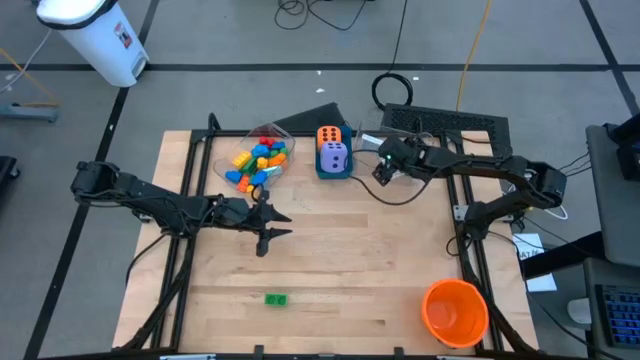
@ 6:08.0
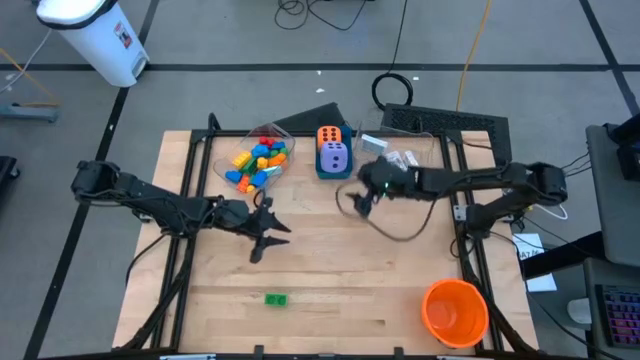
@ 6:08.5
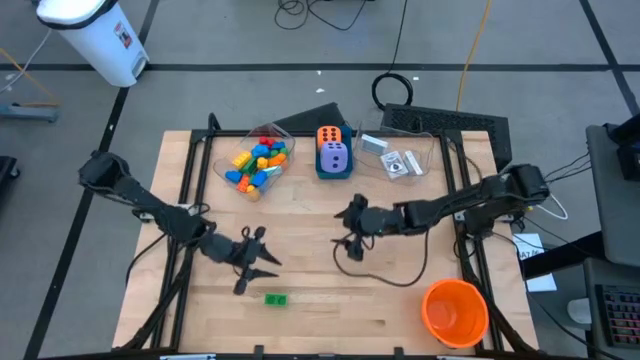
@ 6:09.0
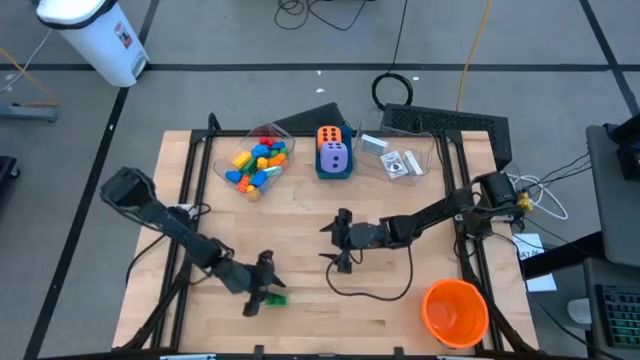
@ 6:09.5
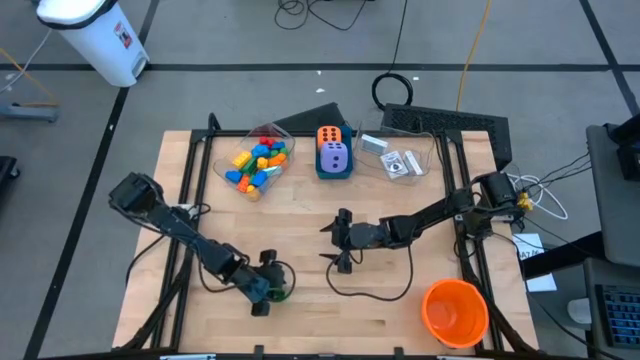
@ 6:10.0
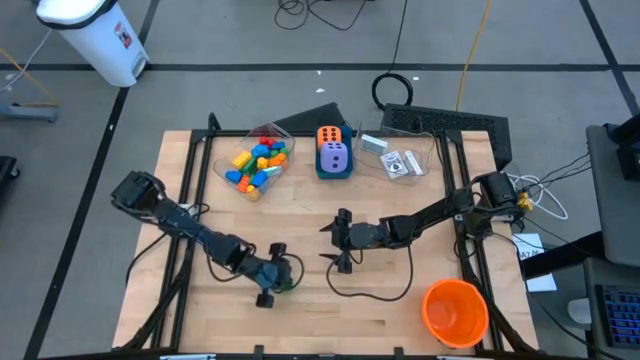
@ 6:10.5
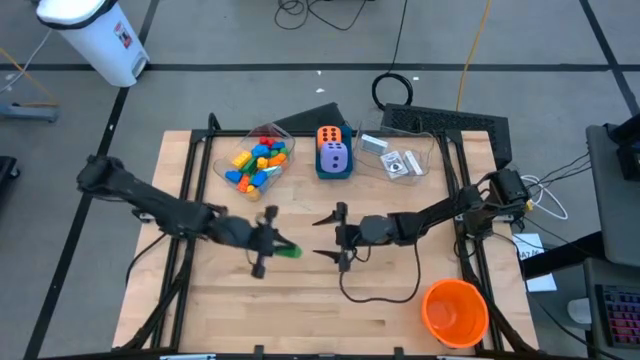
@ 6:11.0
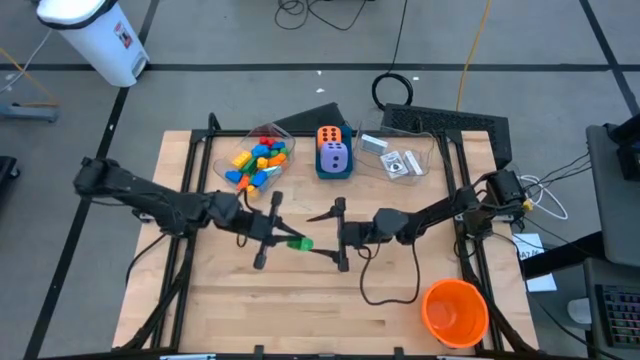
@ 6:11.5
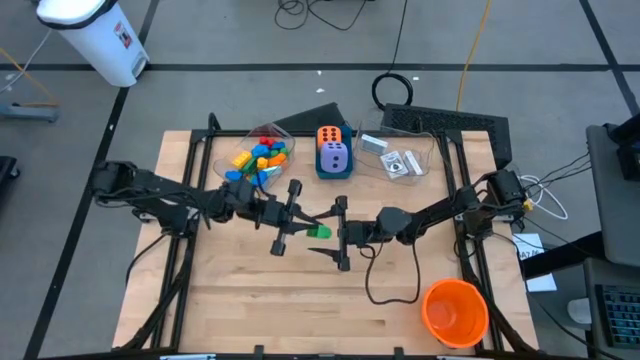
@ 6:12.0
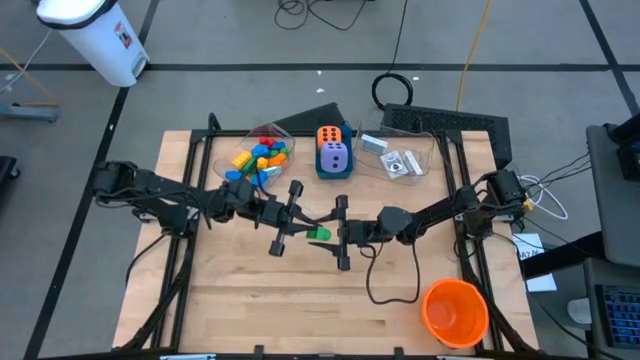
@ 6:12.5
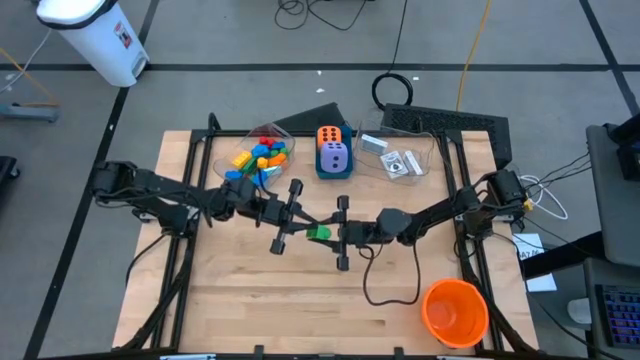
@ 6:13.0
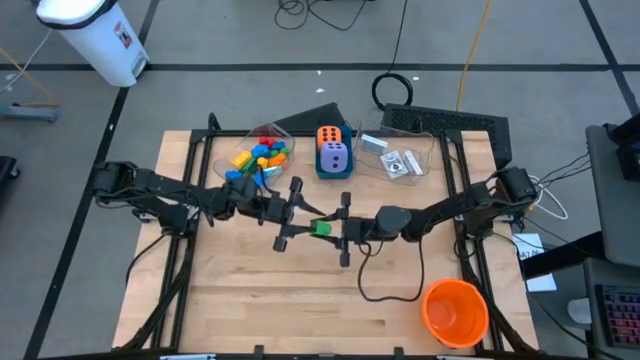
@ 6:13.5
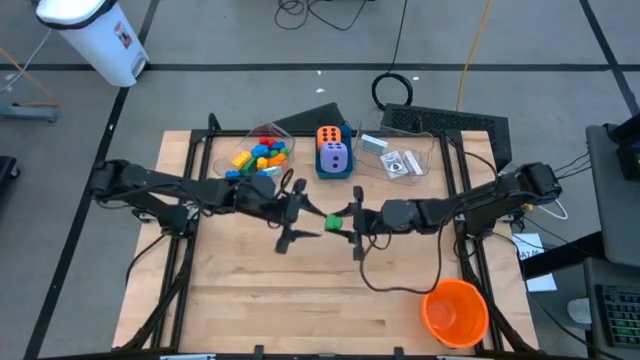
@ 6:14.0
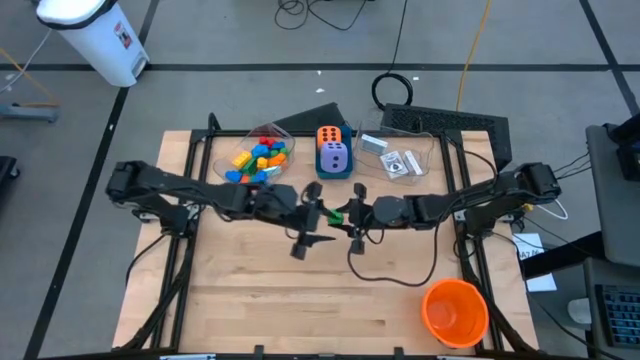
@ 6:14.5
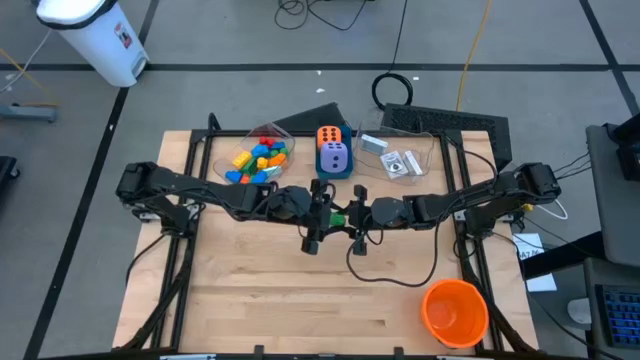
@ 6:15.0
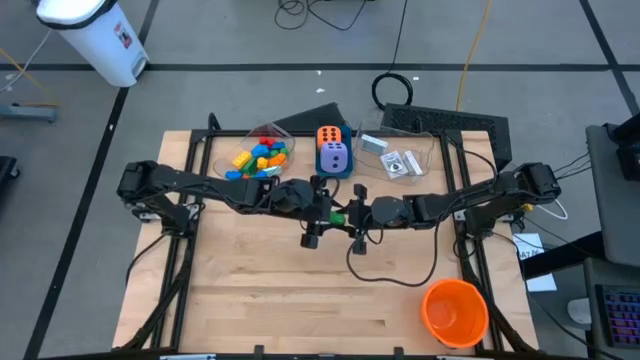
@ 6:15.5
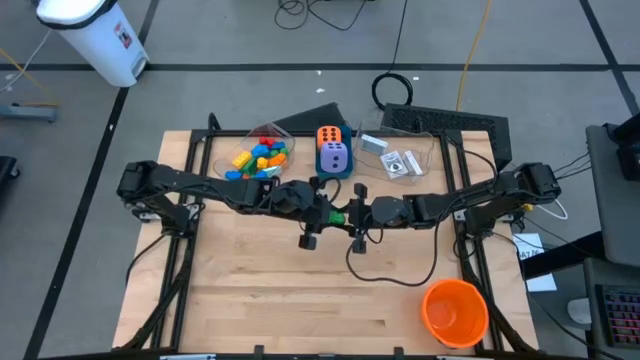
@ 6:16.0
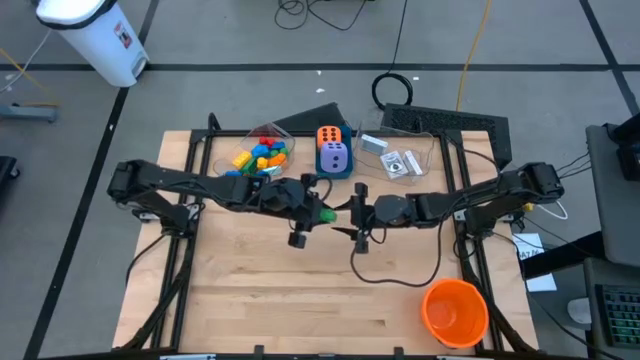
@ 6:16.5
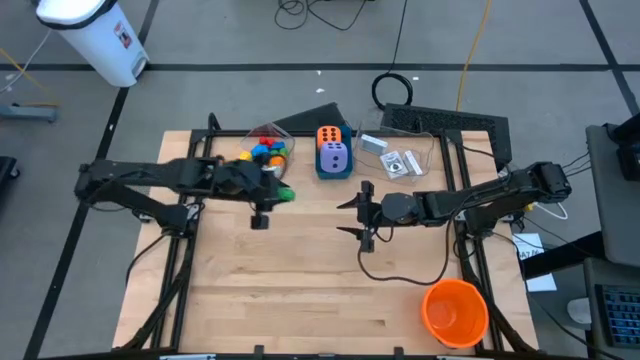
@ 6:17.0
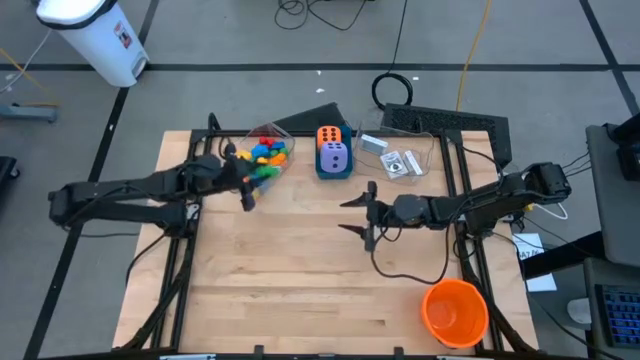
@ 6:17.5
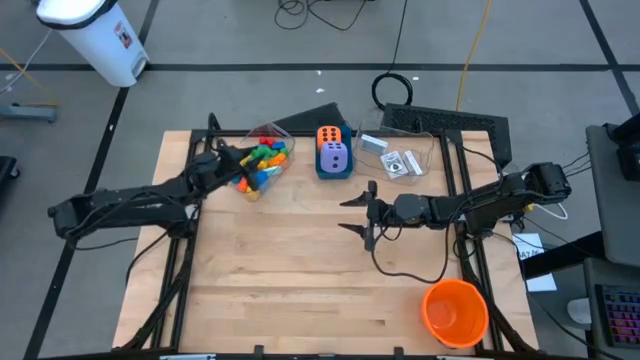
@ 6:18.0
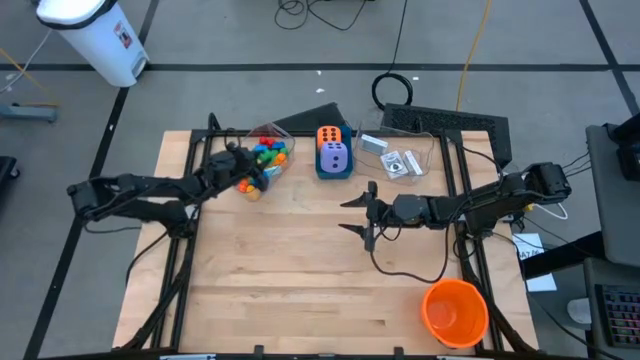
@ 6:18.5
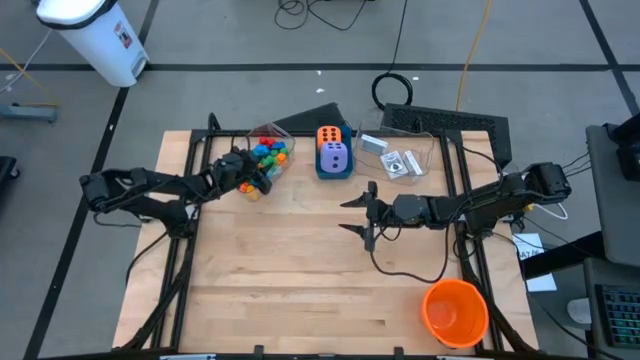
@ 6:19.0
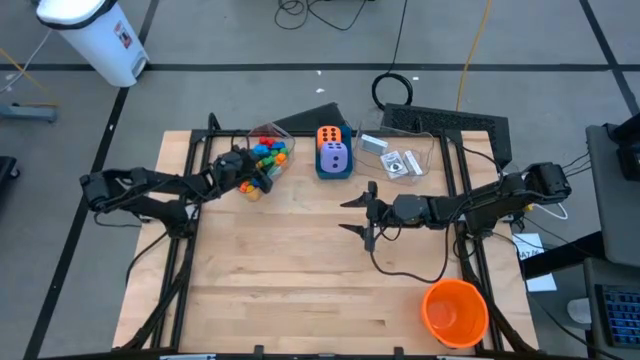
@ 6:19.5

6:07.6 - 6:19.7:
Task: Pick & Place Toys
Put the green game piece into the left transparent bin

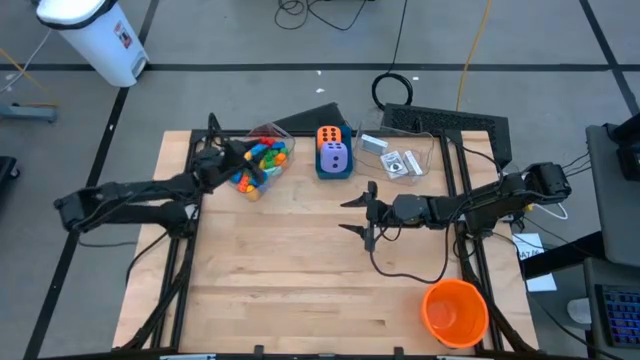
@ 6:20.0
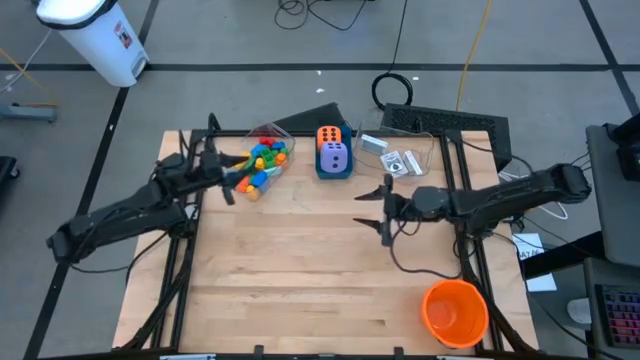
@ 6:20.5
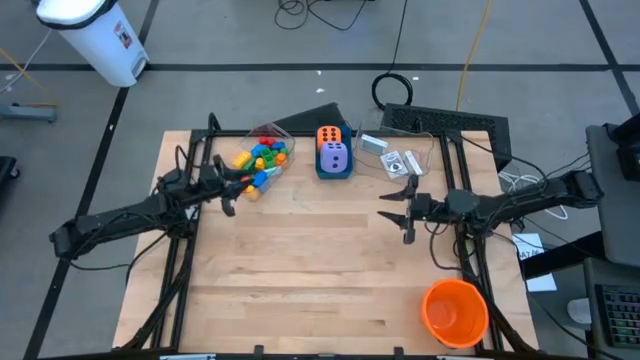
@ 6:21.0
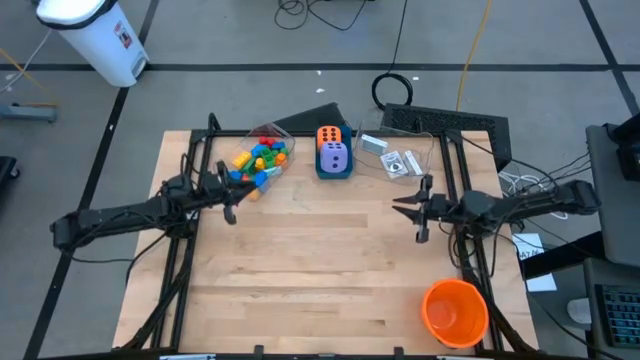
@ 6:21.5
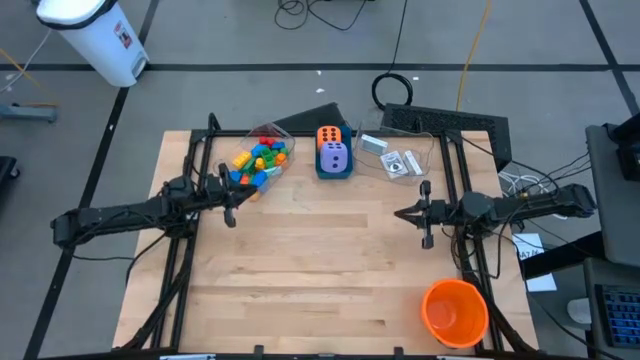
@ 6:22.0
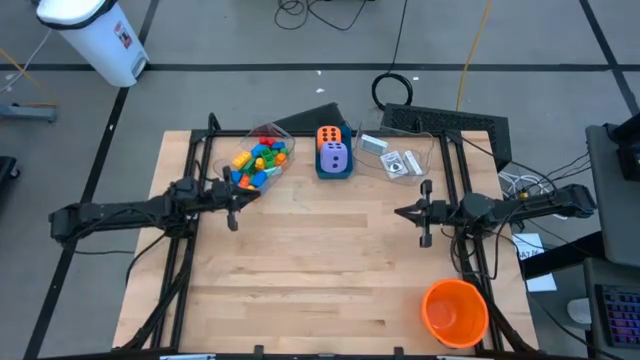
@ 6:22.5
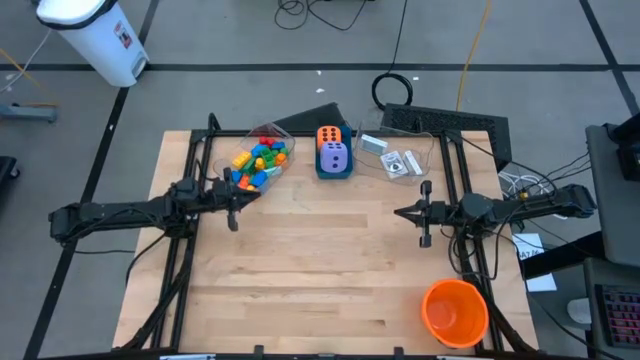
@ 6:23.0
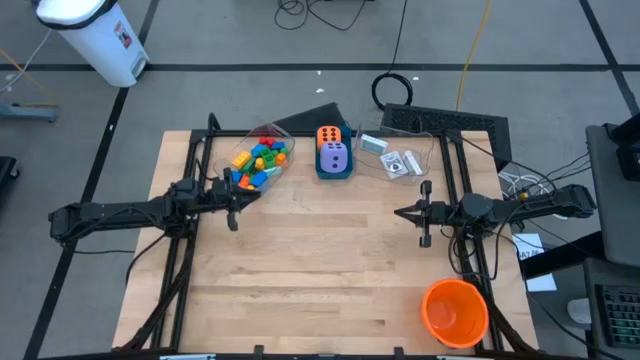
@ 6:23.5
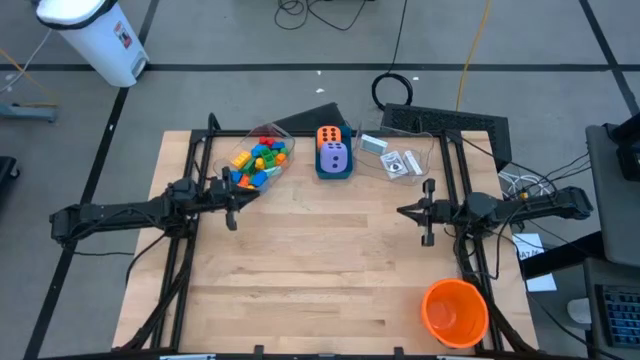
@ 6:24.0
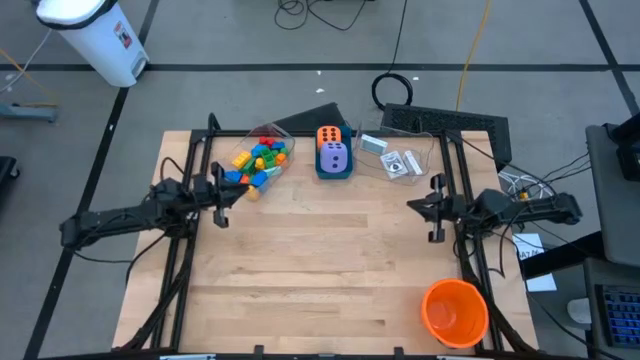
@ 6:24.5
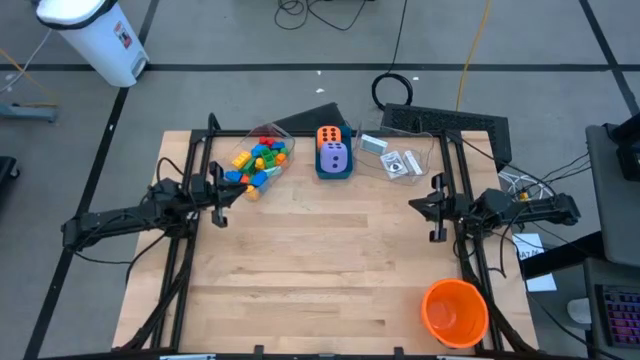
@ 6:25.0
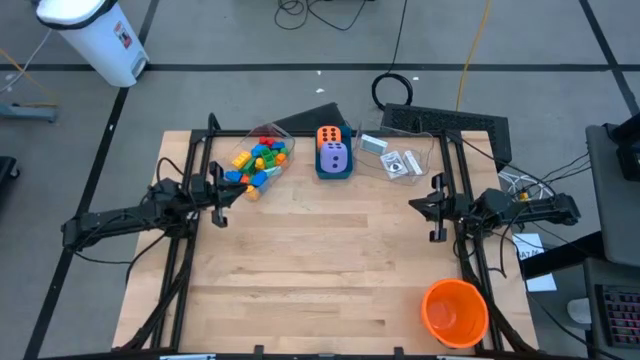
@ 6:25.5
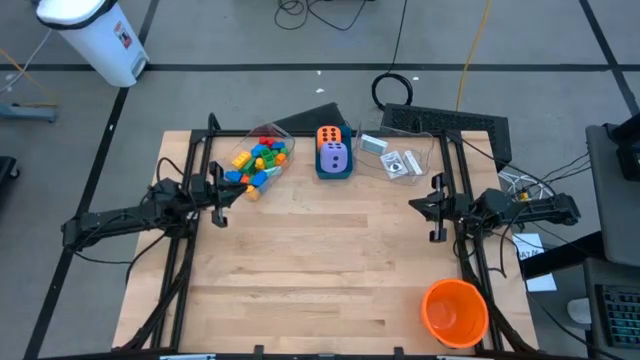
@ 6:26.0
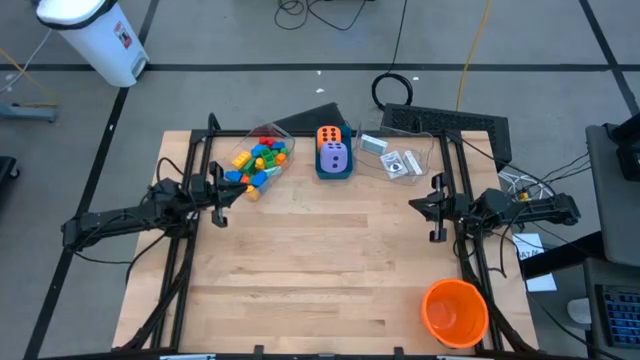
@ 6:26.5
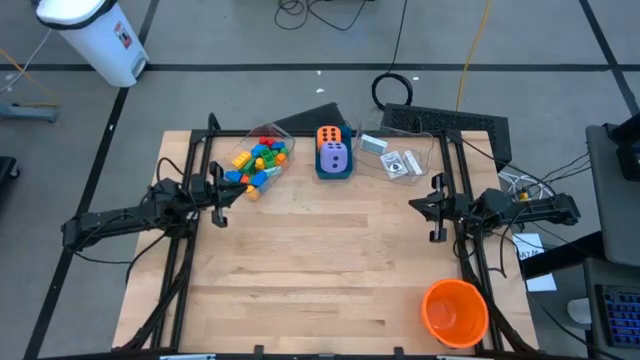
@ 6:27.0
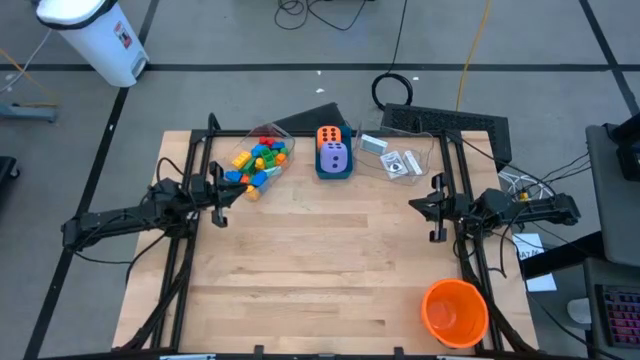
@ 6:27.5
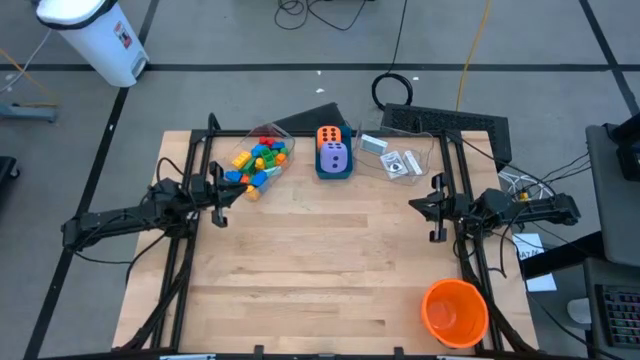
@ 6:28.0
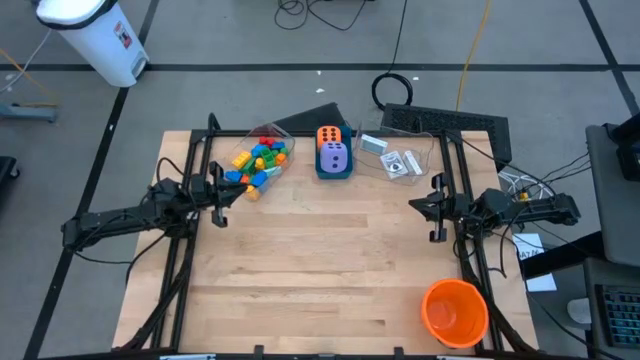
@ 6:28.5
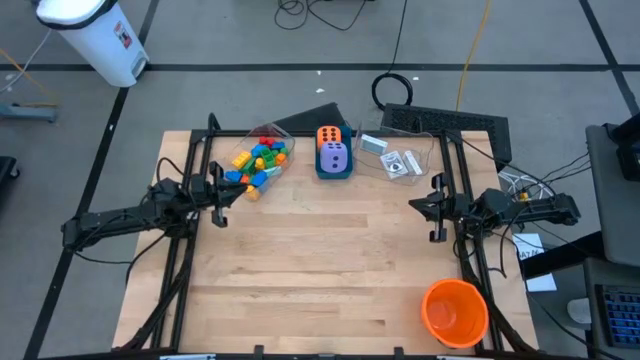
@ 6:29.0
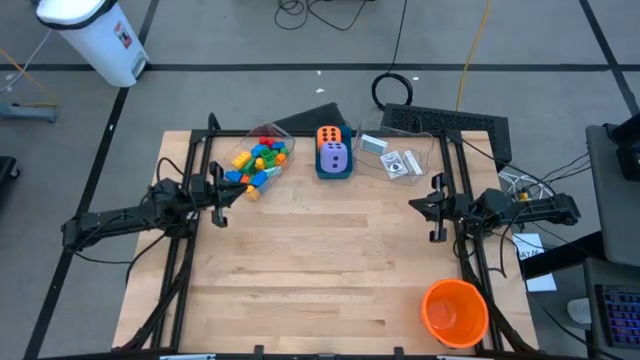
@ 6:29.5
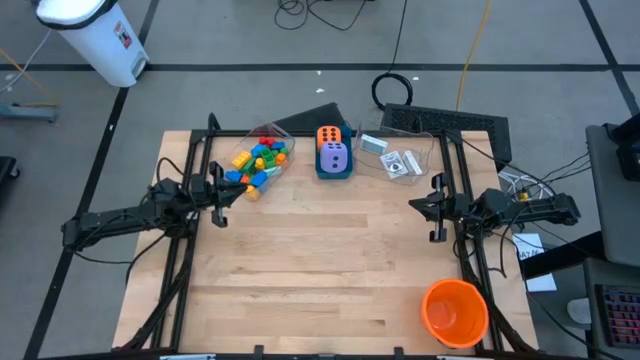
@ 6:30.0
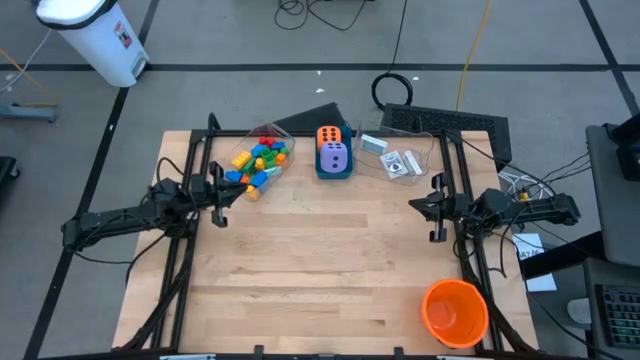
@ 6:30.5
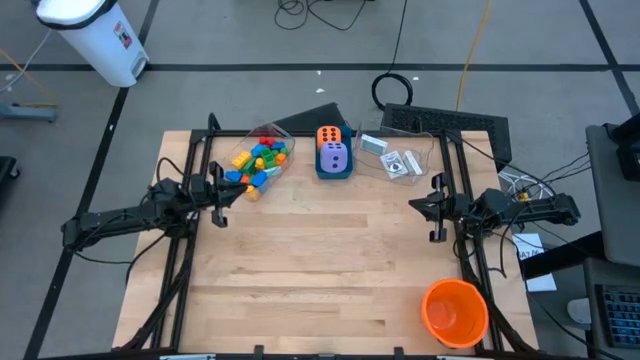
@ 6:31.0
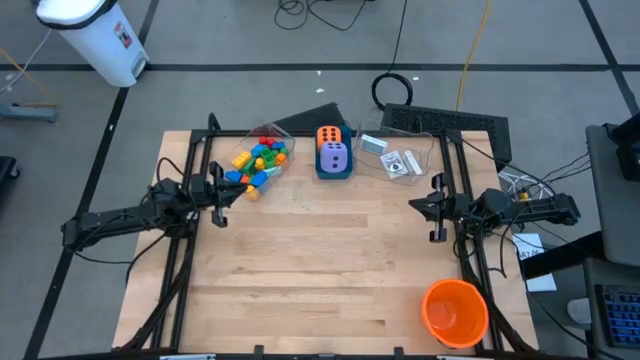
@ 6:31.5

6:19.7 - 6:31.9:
Return to home position
